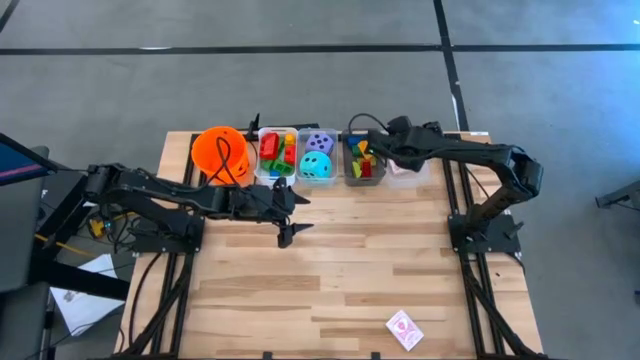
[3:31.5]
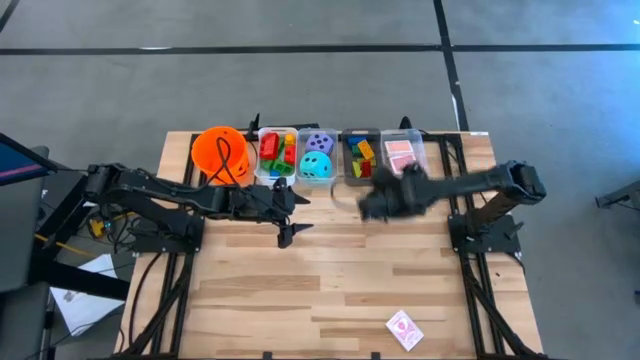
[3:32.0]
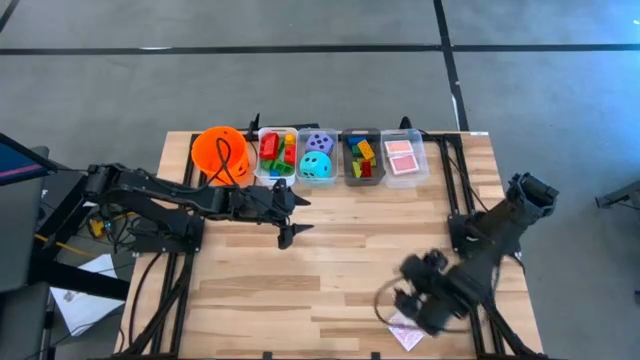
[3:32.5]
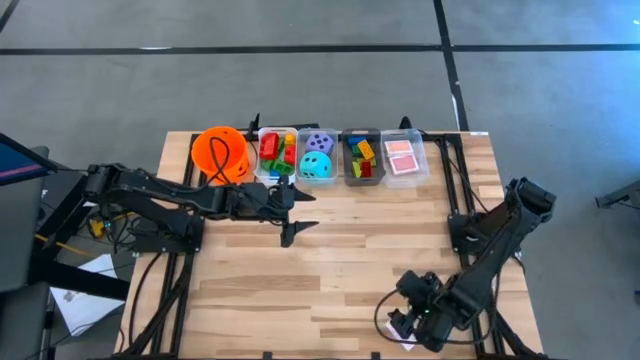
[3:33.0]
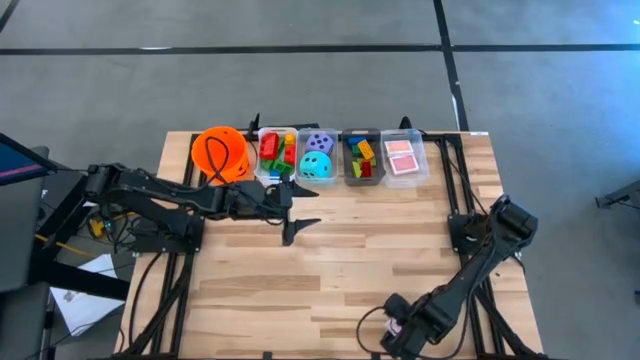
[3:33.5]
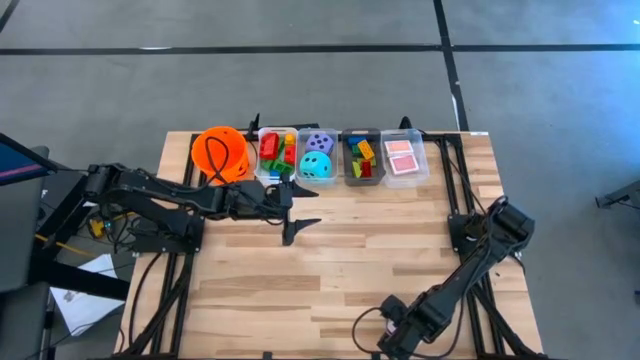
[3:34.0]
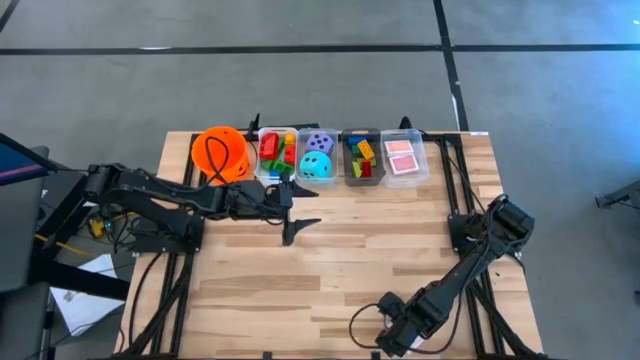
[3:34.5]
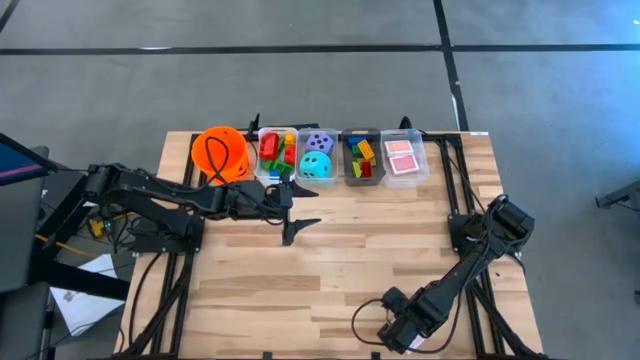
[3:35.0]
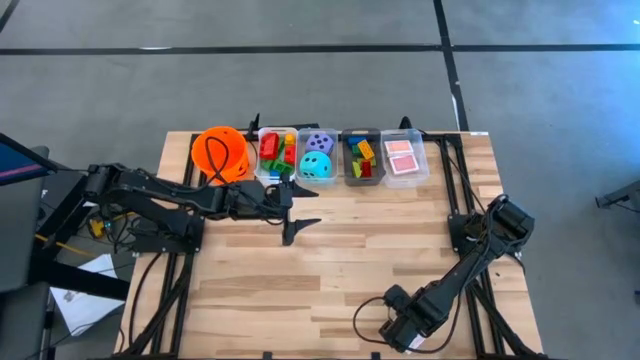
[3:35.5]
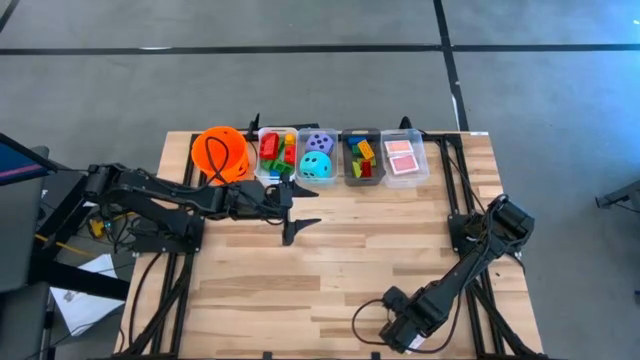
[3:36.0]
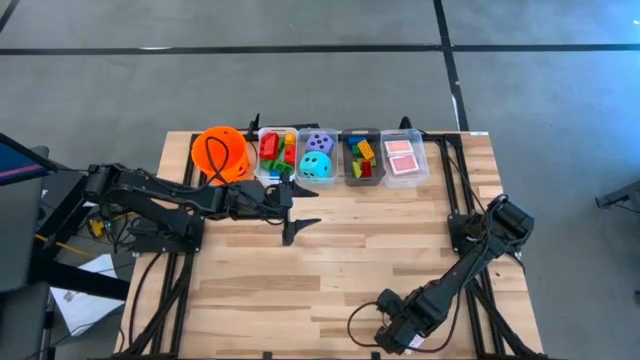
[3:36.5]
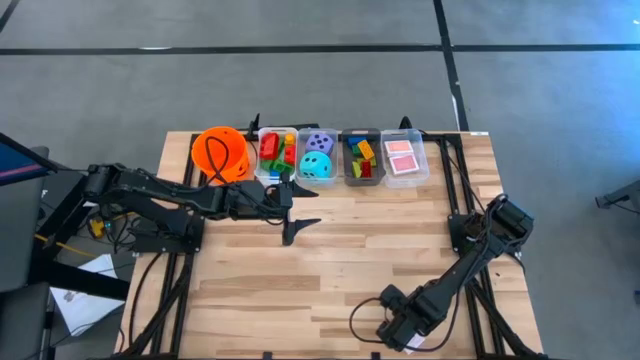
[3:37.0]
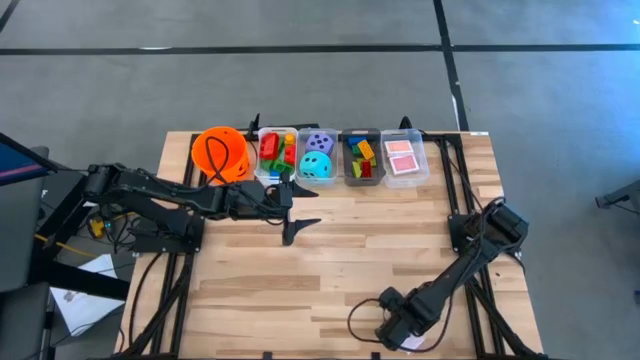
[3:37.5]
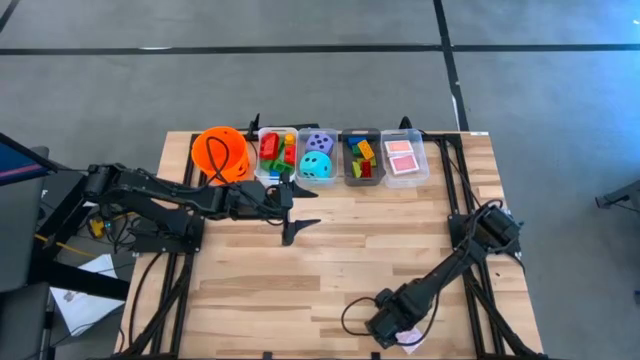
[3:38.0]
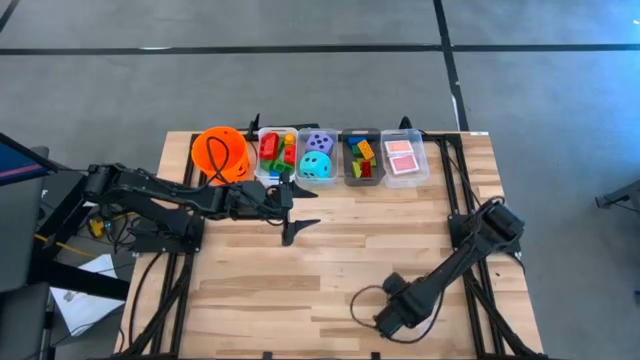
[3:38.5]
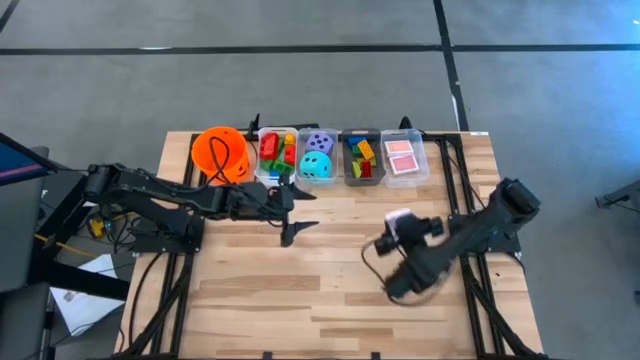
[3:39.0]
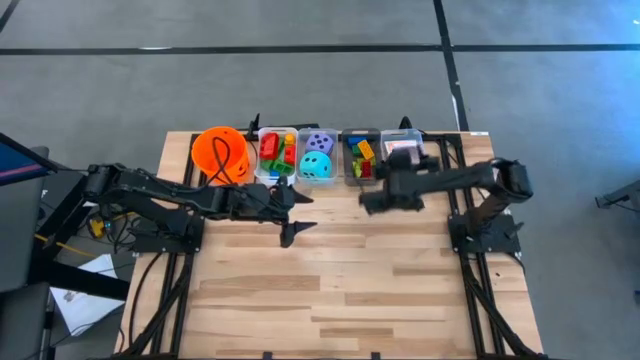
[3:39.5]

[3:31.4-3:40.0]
Task: Pick & Place Toys
Put the red deck of cards into the right transparent bin

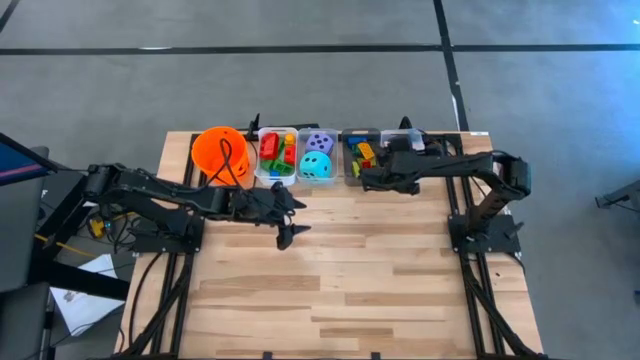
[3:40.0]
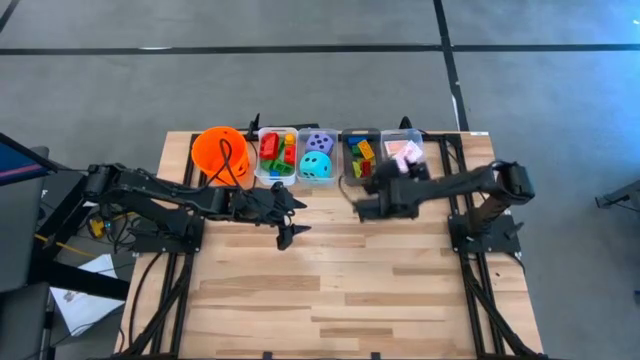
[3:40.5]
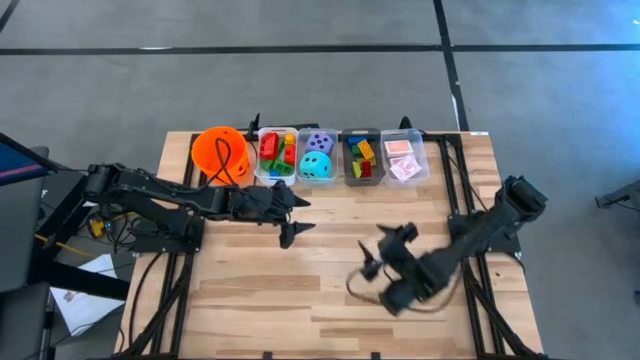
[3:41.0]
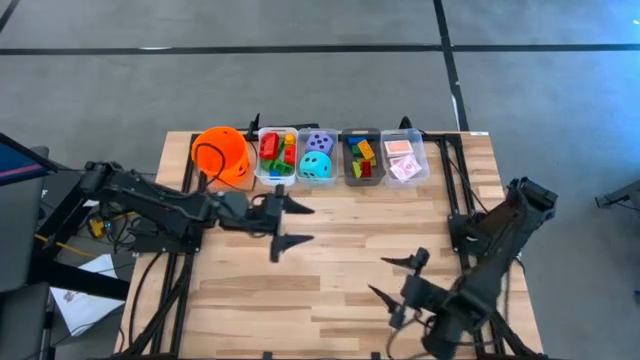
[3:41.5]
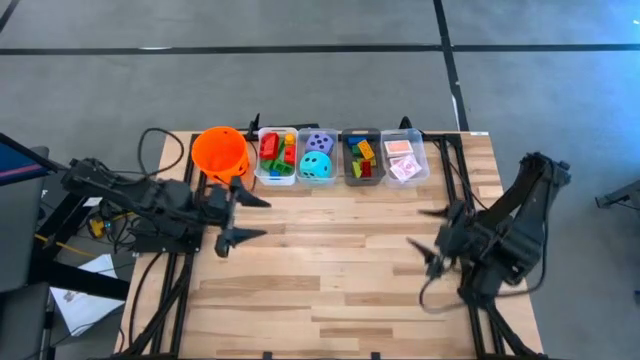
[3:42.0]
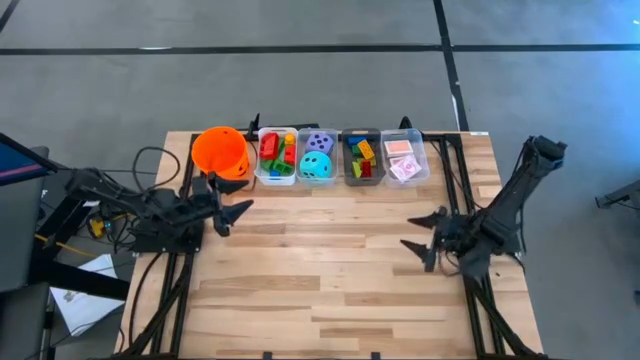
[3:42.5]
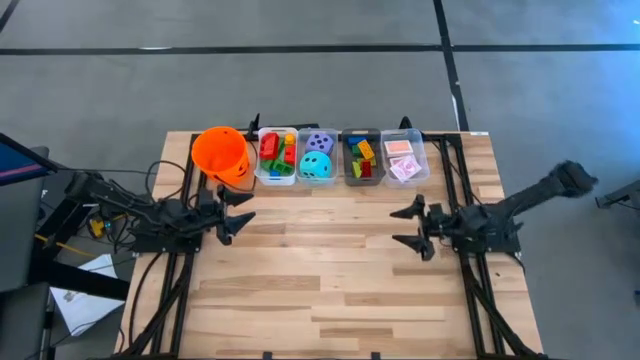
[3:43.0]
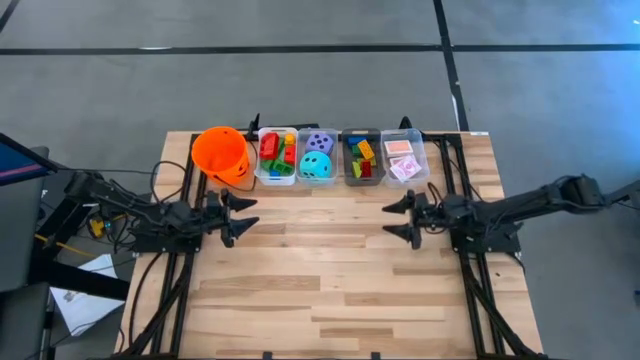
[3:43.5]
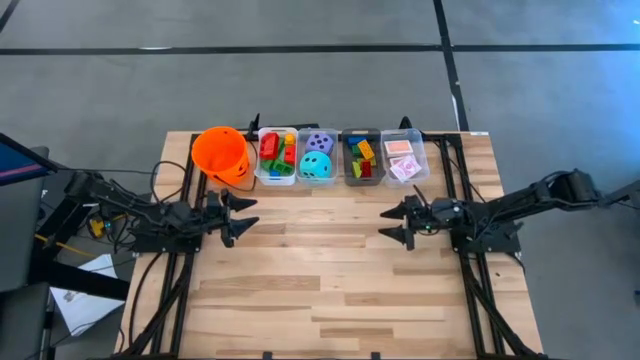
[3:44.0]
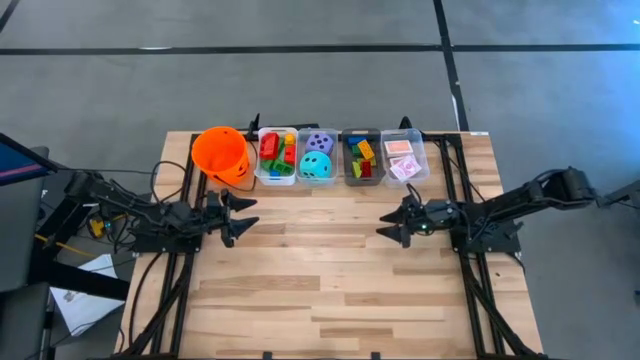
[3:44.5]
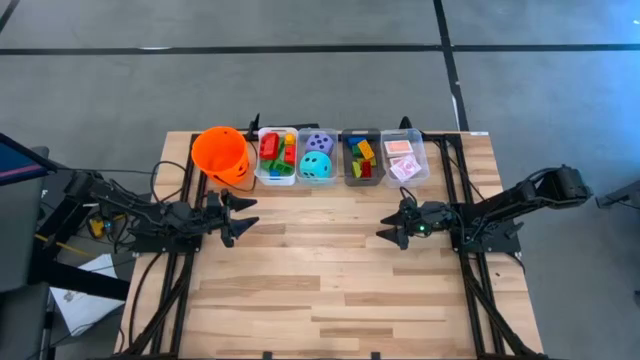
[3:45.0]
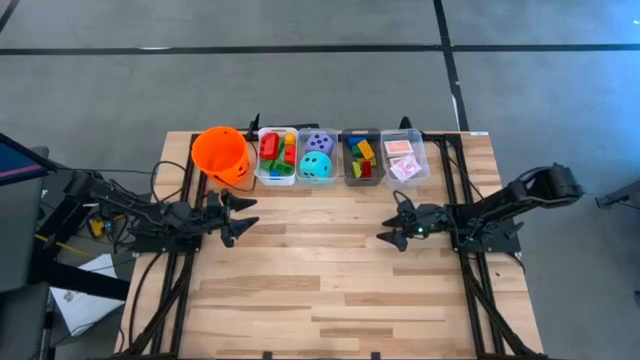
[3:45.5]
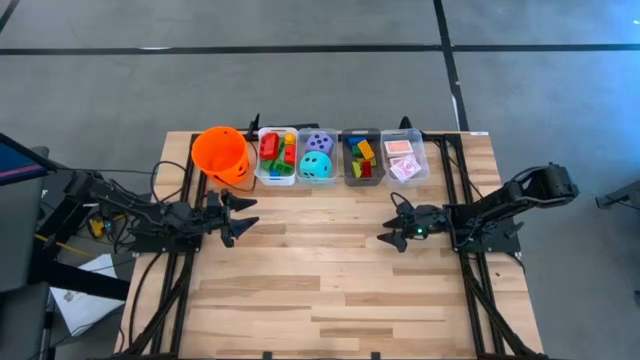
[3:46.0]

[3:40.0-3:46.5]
Return to Home Position

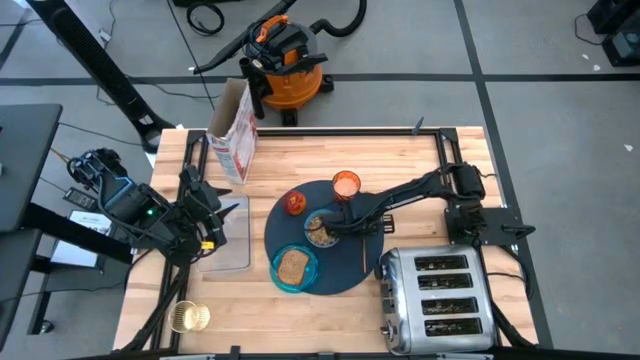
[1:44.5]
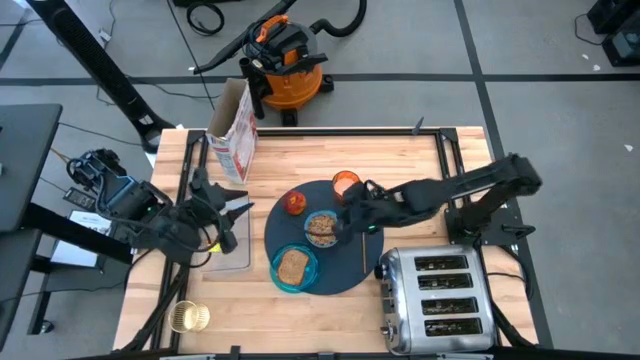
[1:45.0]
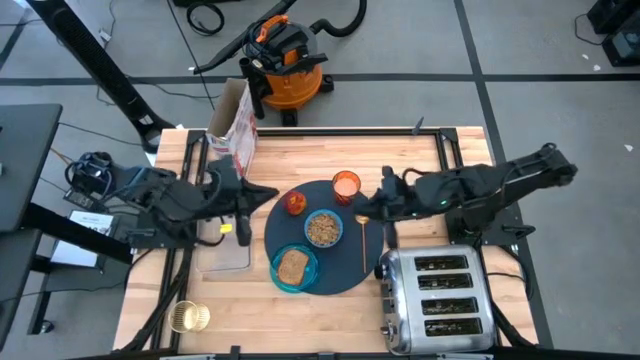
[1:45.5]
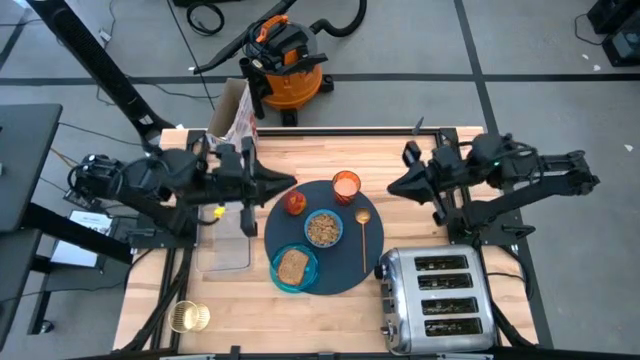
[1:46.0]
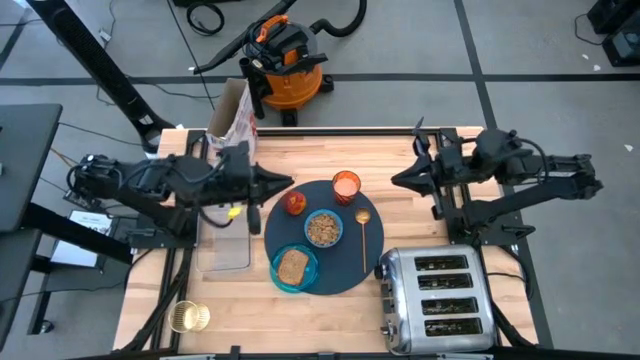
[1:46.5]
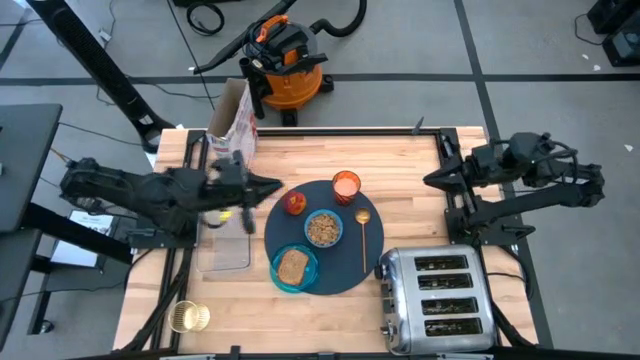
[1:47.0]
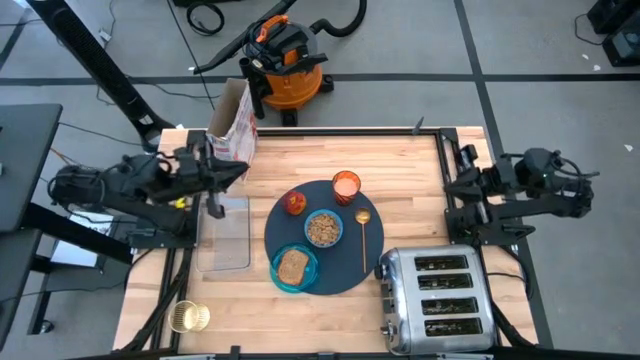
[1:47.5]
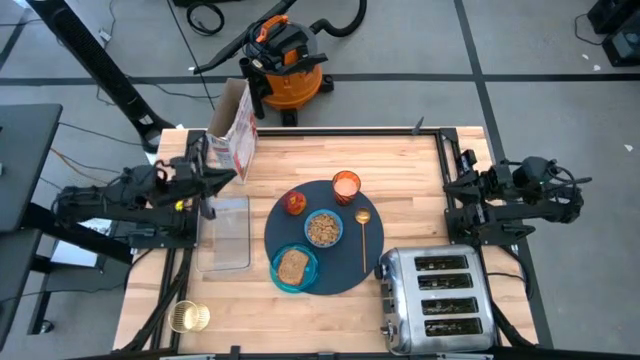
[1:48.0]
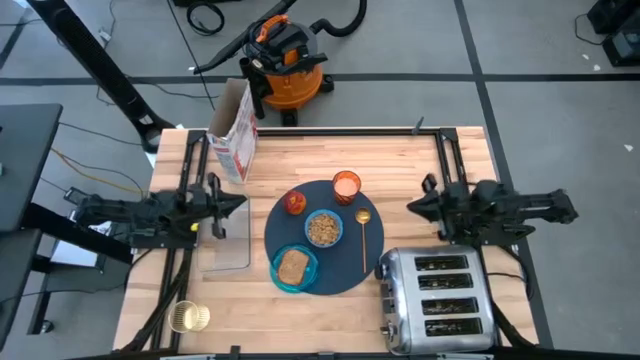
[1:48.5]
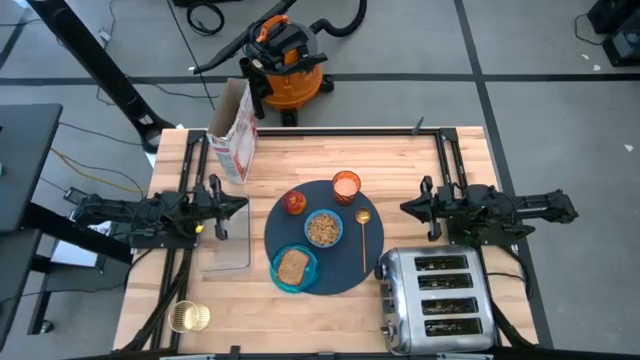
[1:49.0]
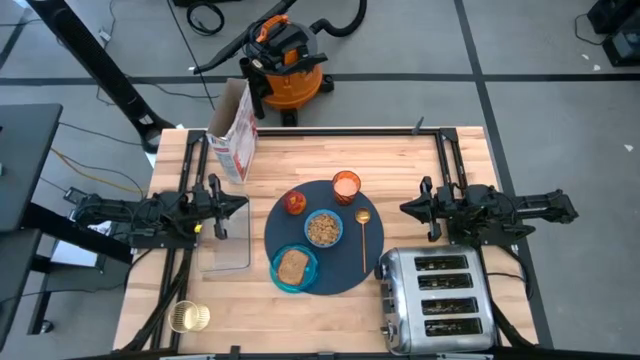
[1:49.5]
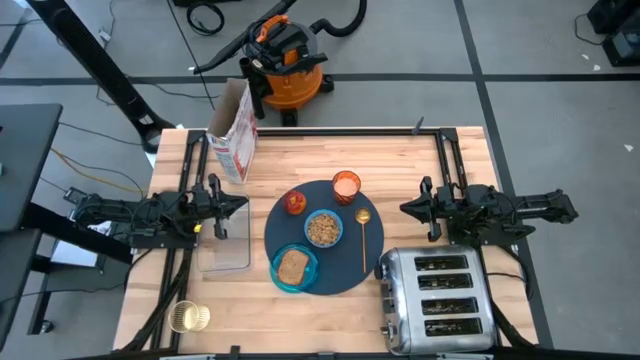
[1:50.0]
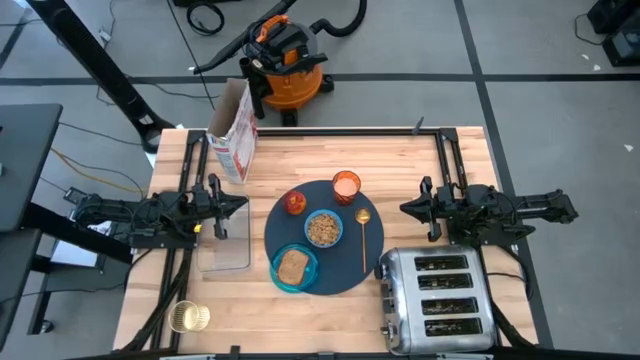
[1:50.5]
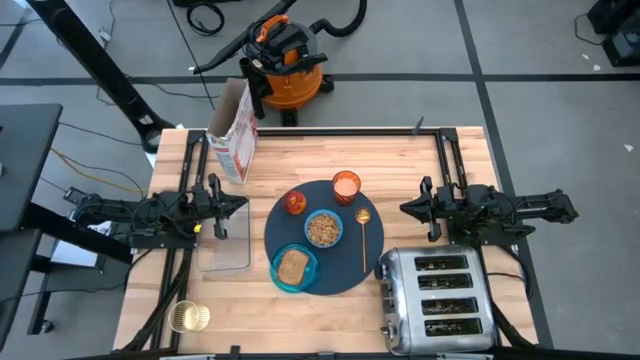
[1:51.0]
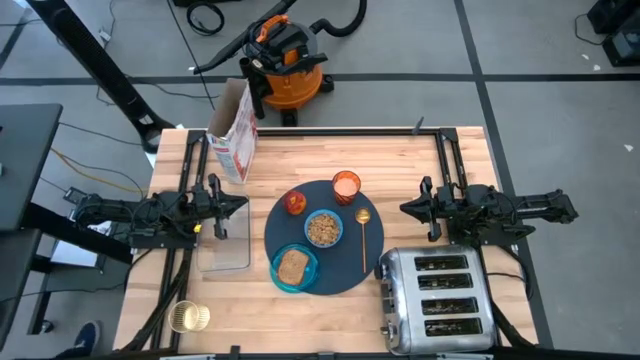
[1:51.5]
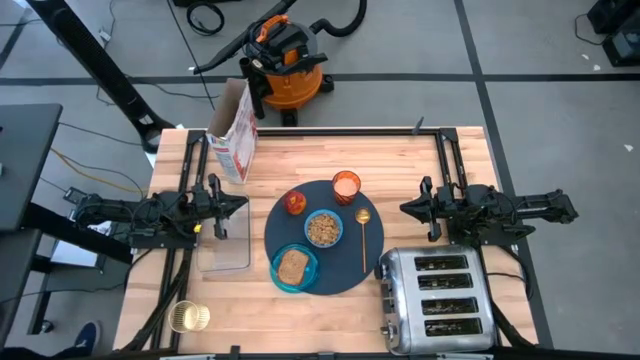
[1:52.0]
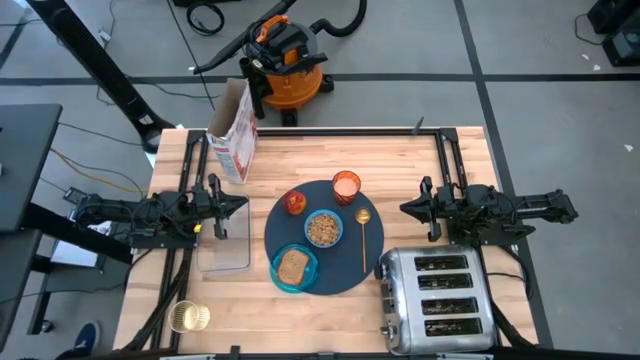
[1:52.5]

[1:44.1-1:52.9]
Task: Arrange a breakfast setting
Return to Home Position
